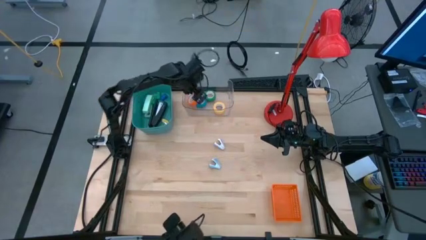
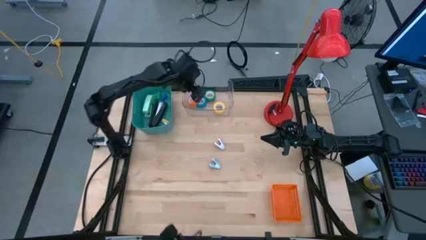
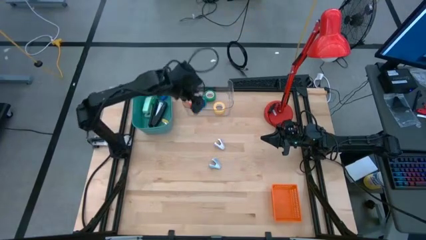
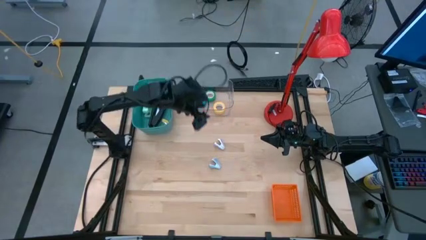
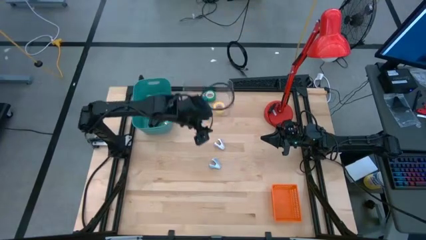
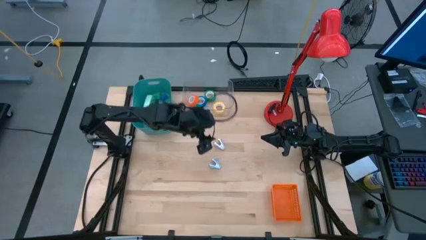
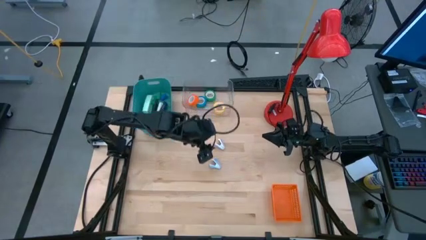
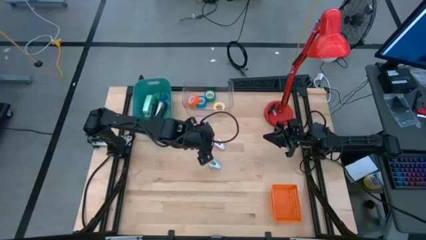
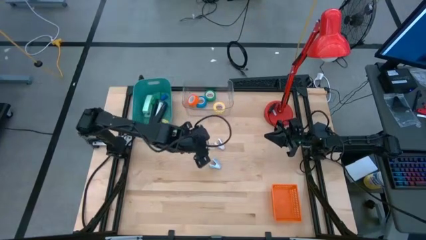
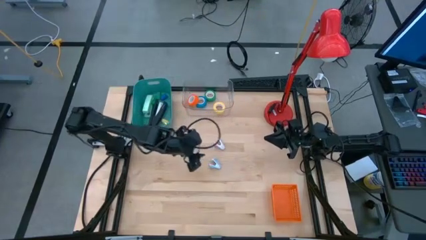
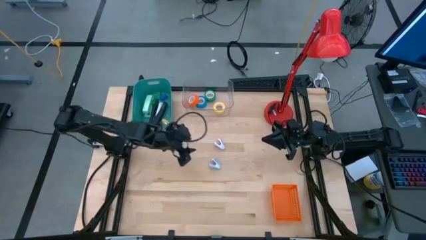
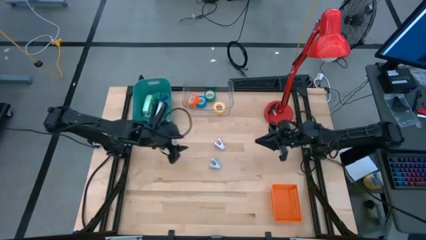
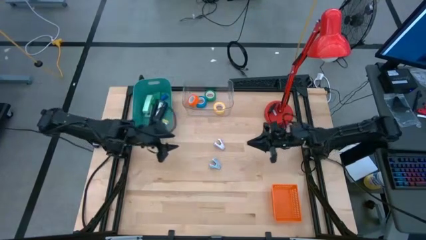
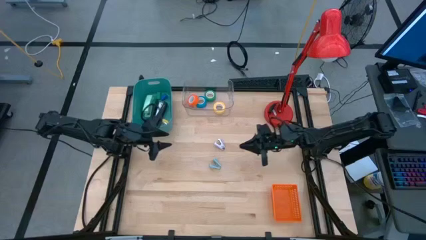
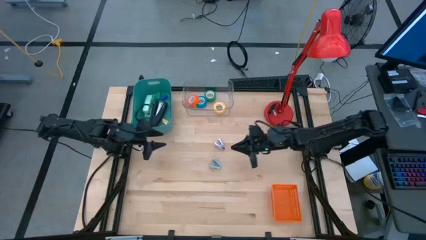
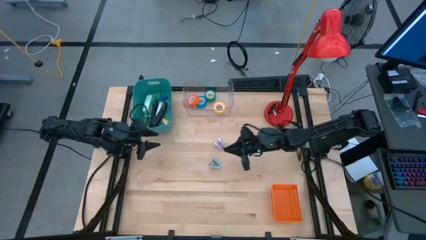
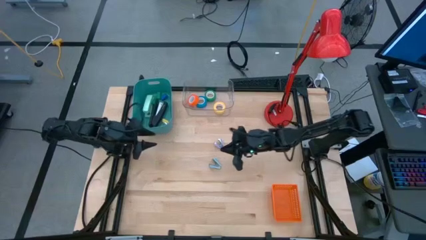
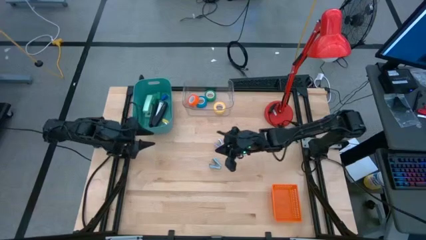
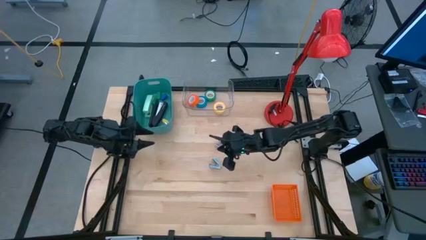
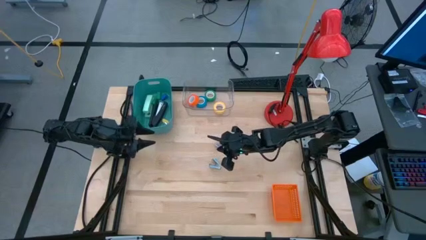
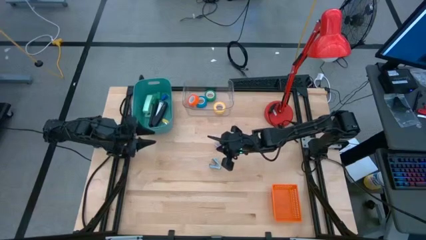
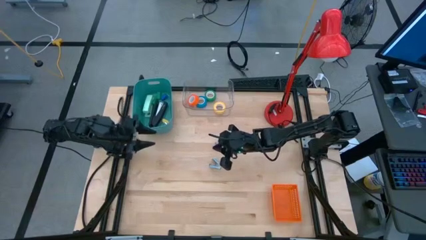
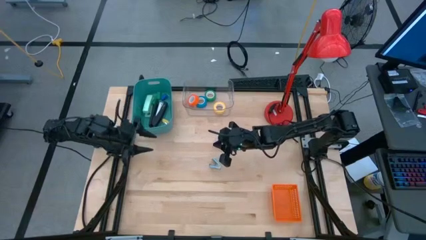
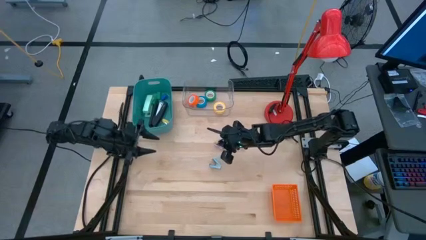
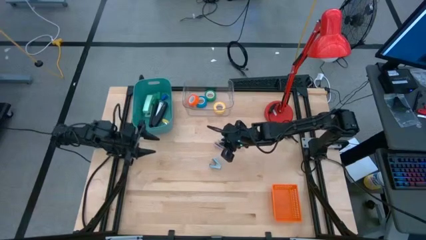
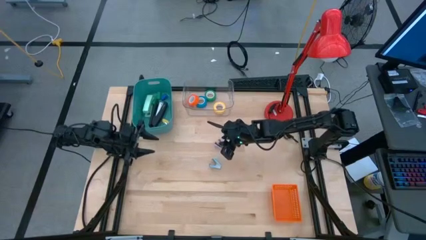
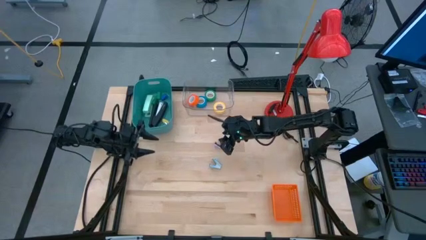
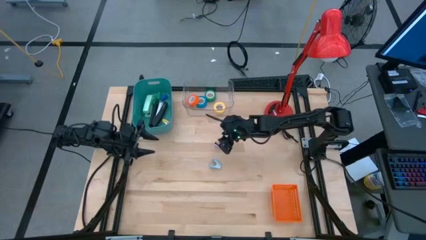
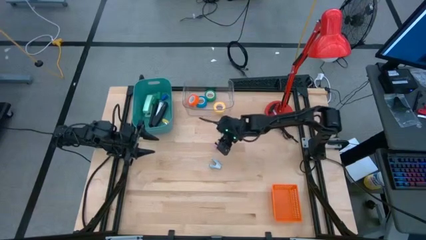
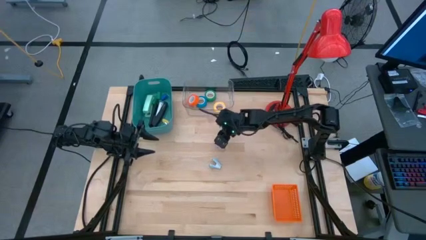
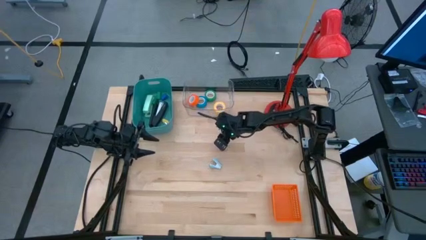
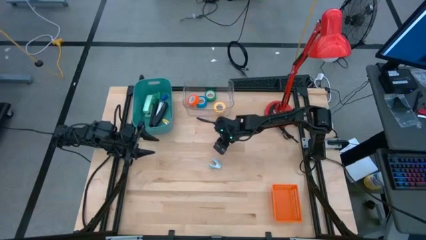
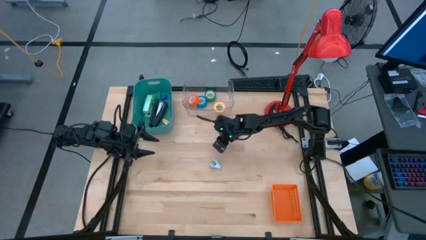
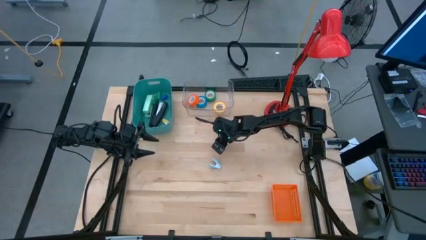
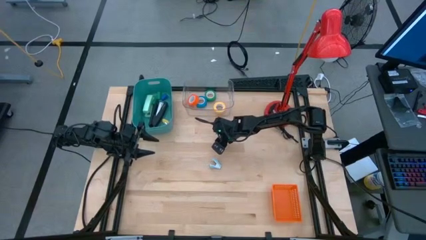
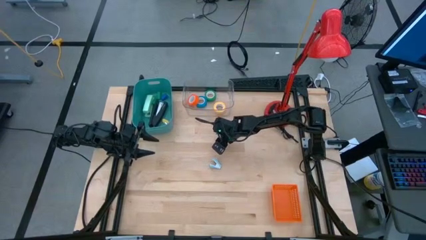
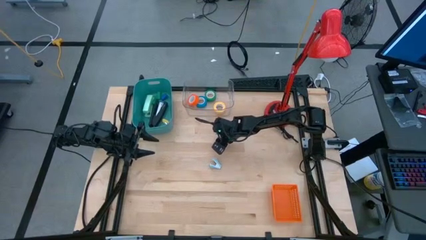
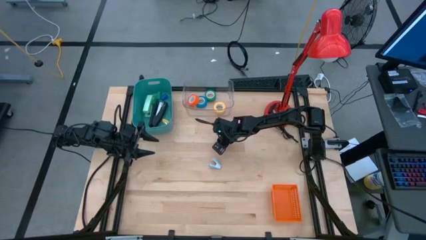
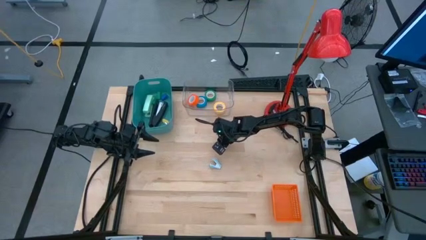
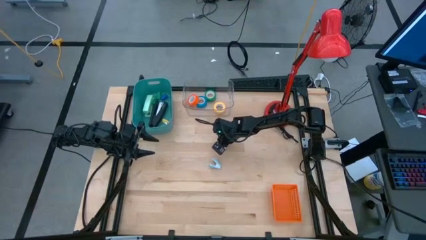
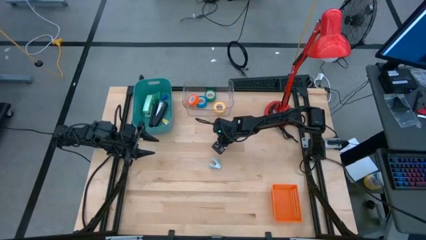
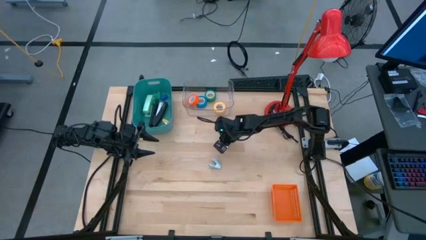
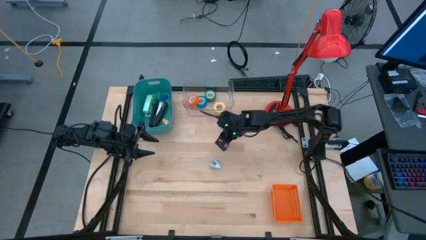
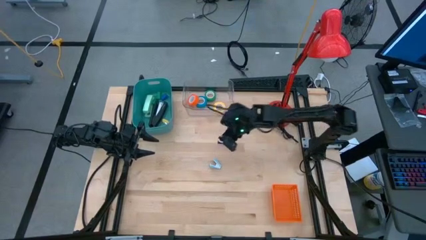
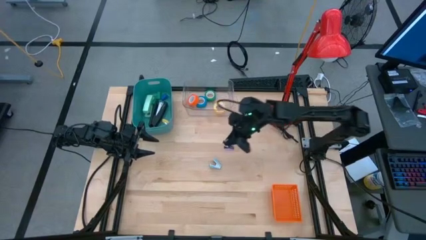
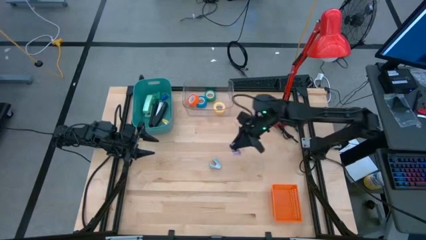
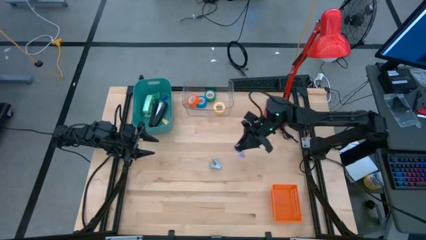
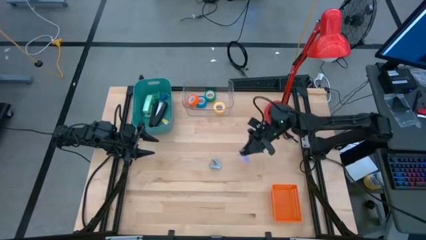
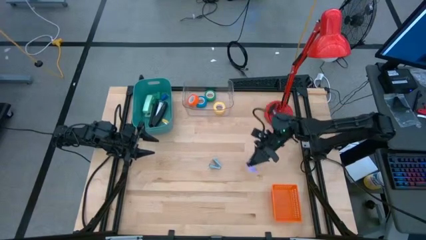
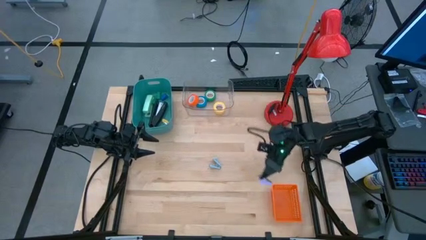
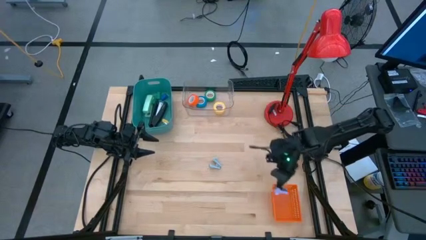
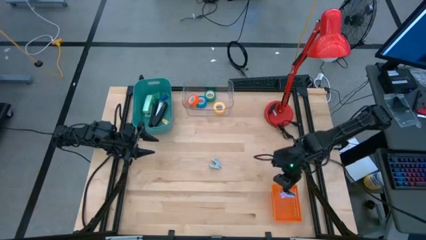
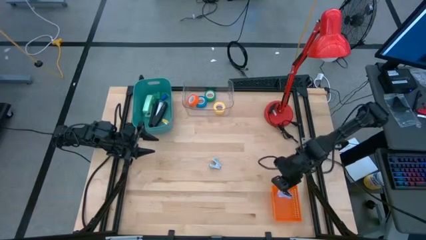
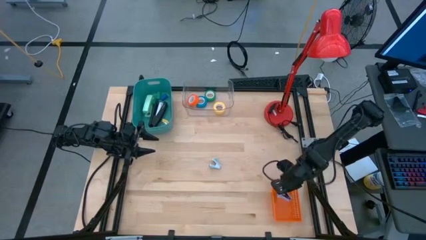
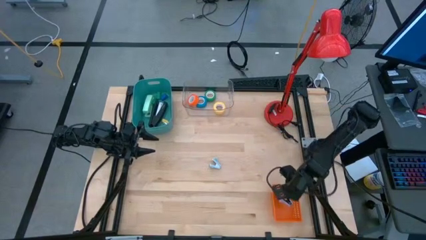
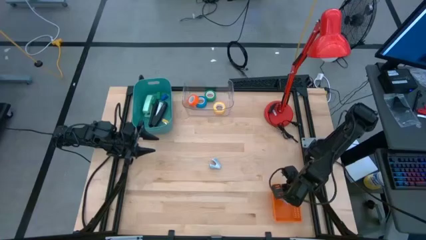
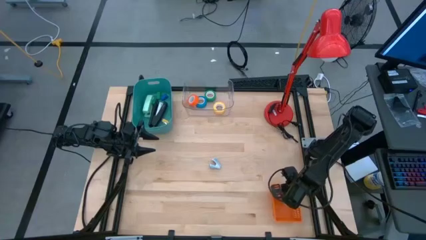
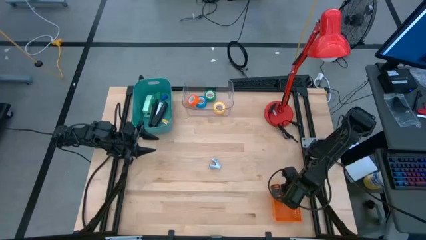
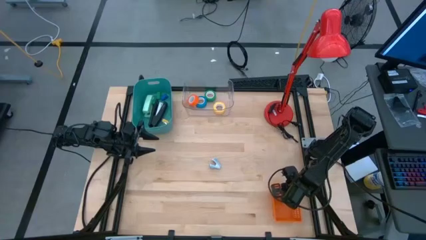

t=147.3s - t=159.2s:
Task: Pick and place Stapler, Stapler remover, tape
Put the pink staple remover into the orange bin

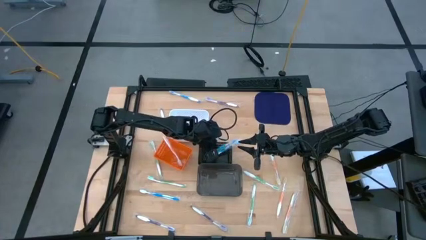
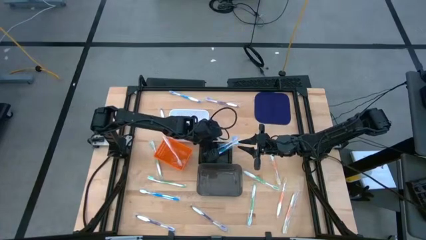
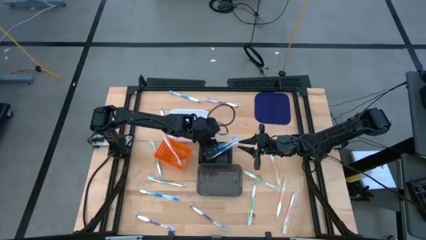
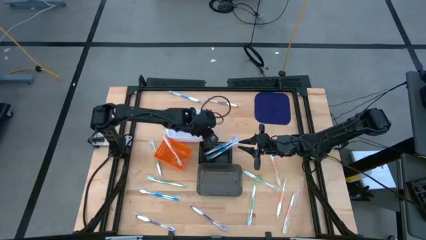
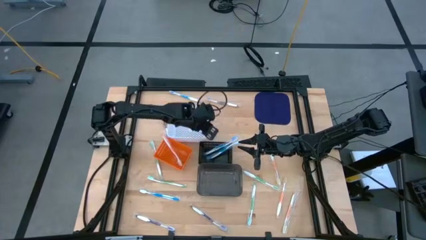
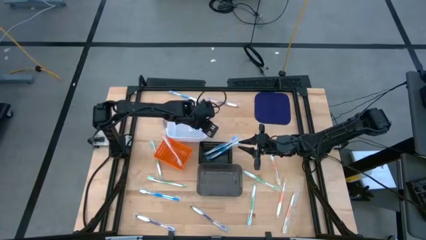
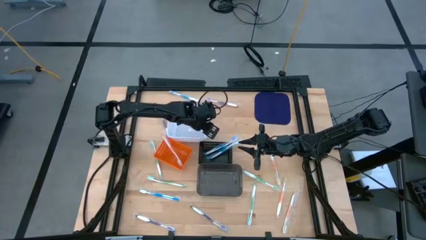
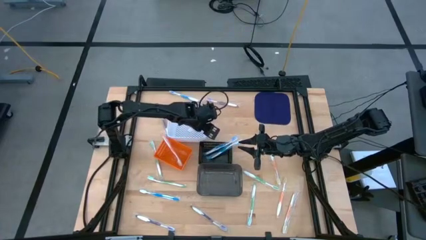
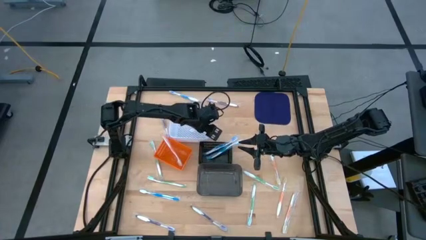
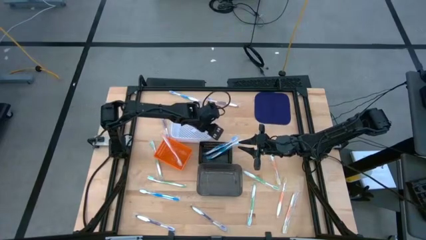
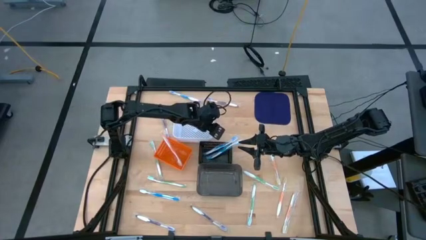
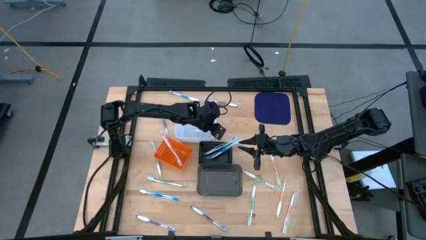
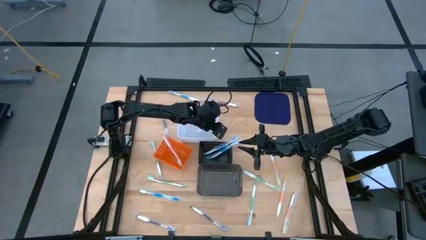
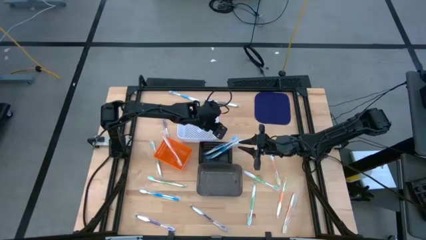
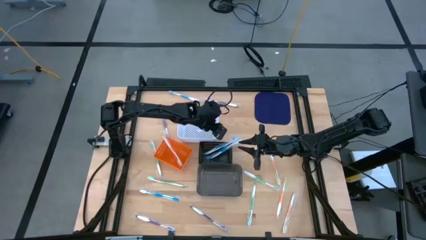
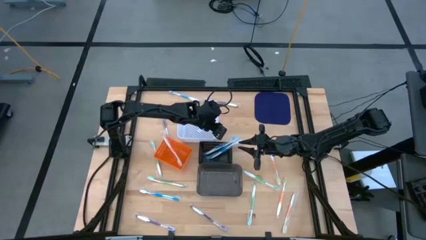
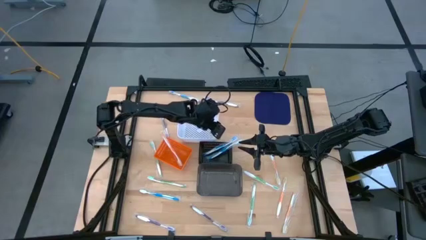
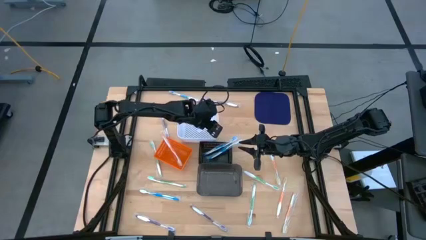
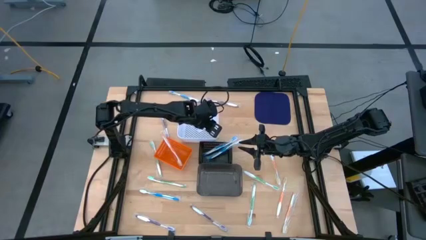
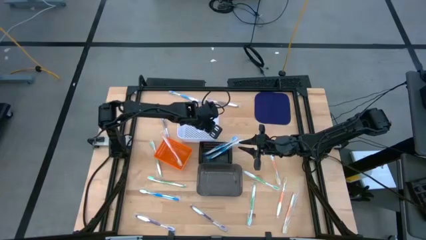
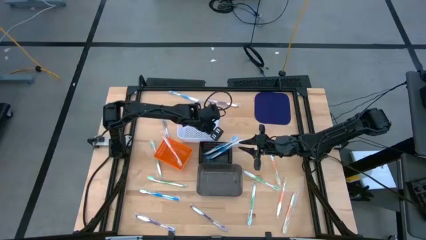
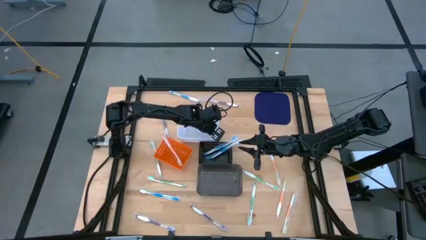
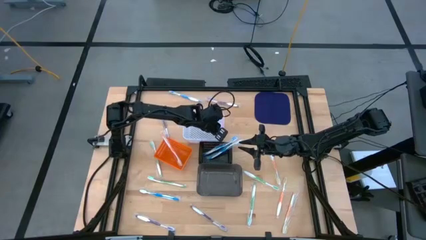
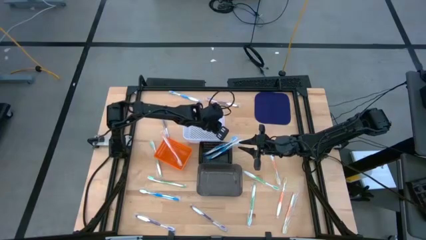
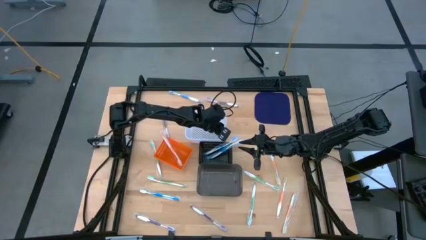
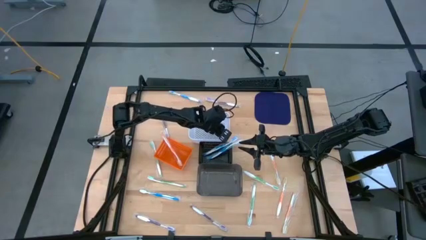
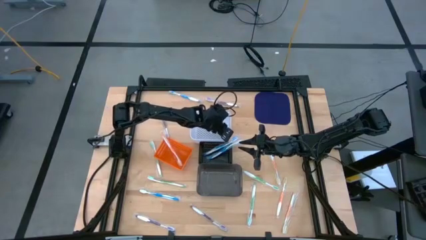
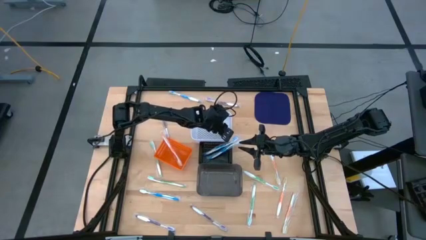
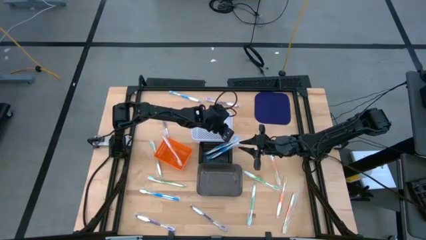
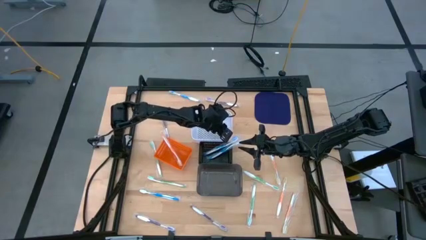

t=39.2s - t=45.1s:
Task: Pick & Place Toothbrushes
Adjust the white basket on the table
